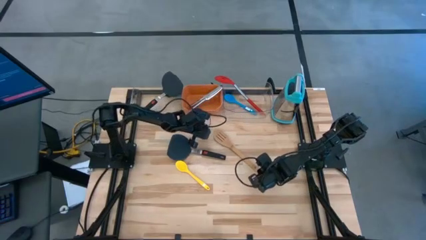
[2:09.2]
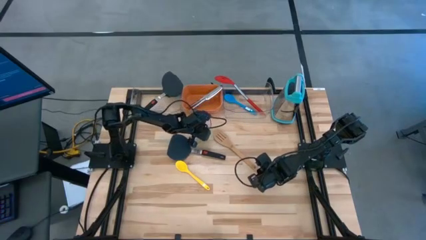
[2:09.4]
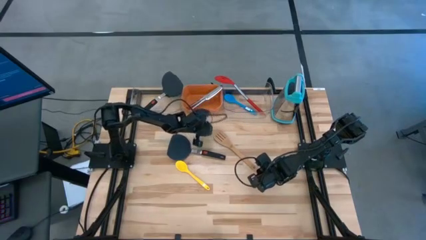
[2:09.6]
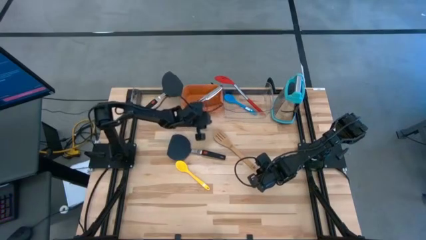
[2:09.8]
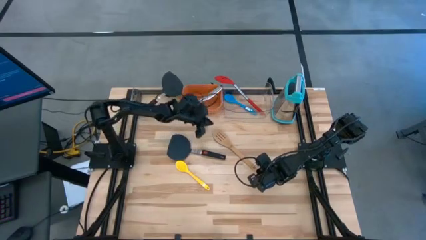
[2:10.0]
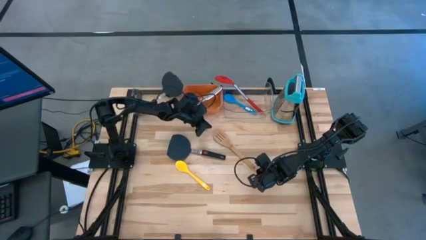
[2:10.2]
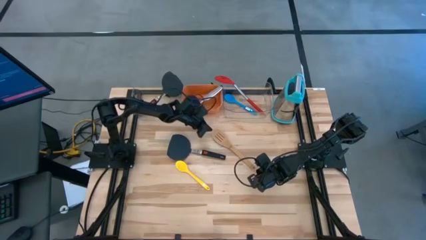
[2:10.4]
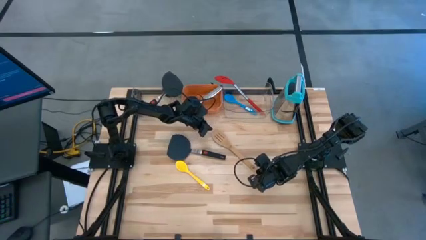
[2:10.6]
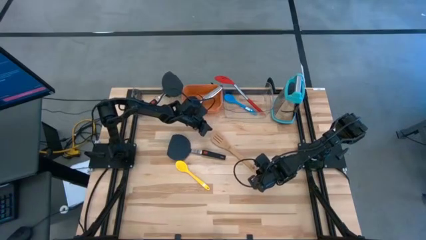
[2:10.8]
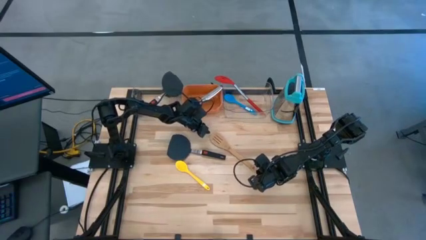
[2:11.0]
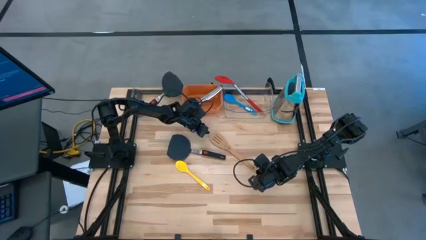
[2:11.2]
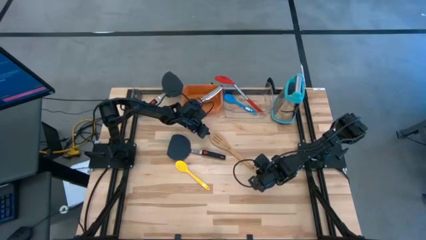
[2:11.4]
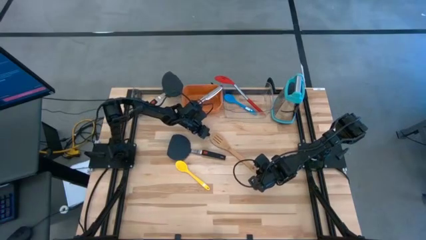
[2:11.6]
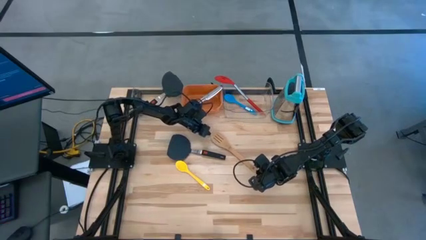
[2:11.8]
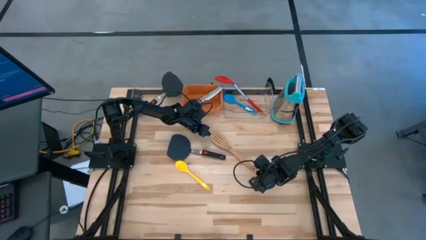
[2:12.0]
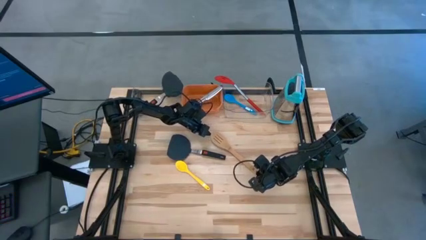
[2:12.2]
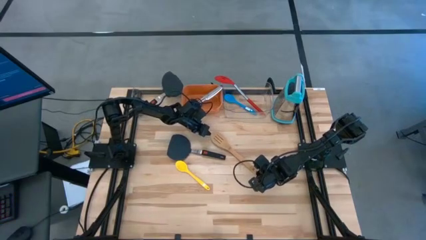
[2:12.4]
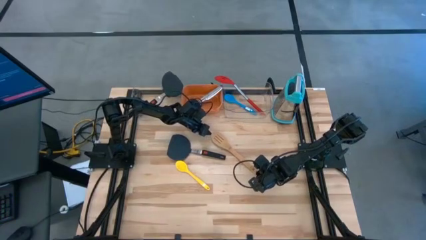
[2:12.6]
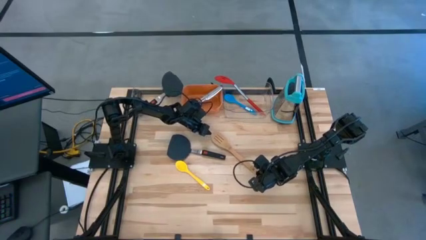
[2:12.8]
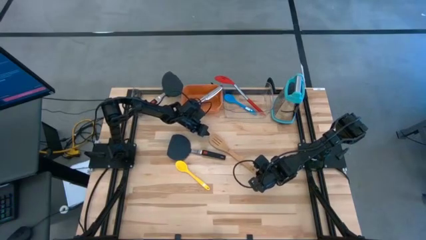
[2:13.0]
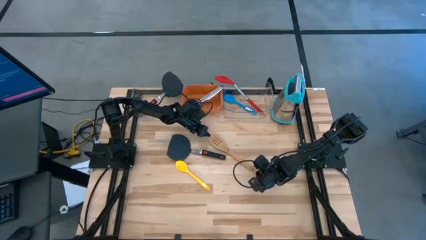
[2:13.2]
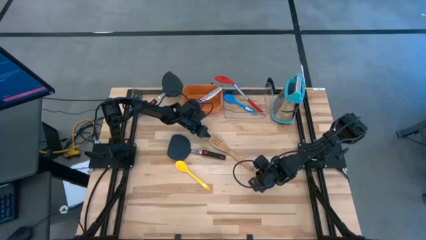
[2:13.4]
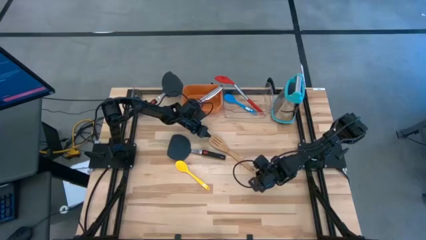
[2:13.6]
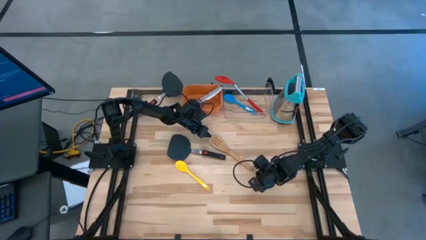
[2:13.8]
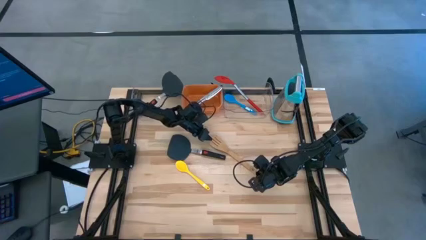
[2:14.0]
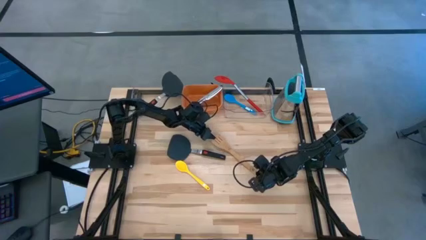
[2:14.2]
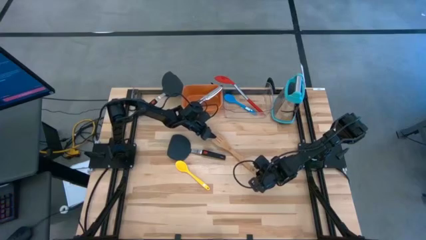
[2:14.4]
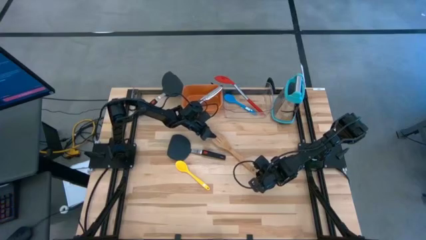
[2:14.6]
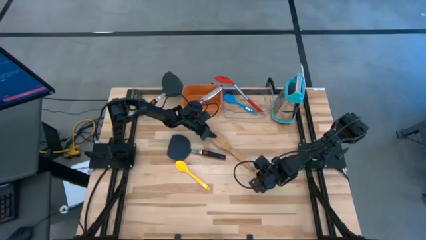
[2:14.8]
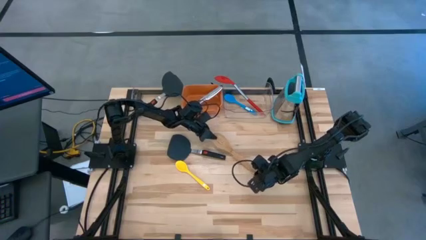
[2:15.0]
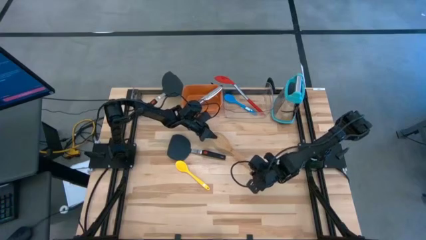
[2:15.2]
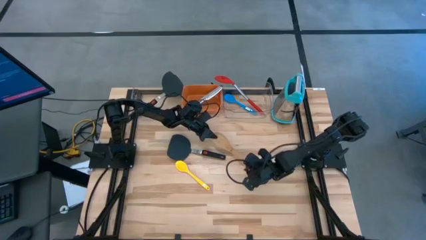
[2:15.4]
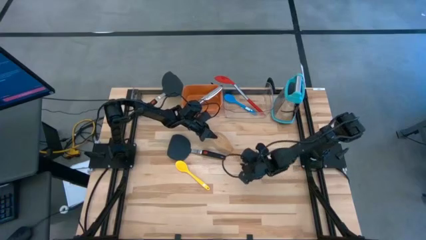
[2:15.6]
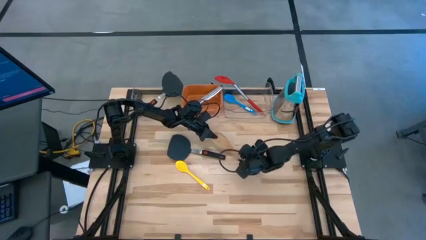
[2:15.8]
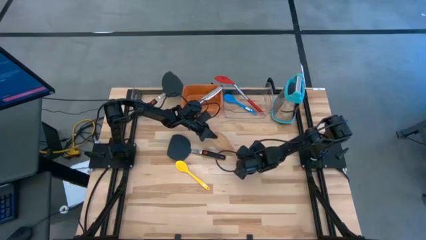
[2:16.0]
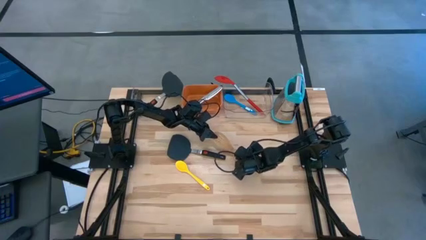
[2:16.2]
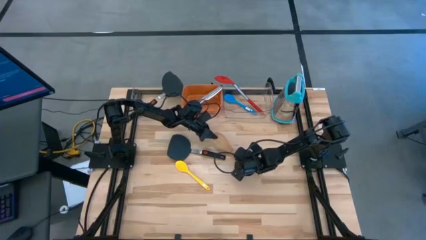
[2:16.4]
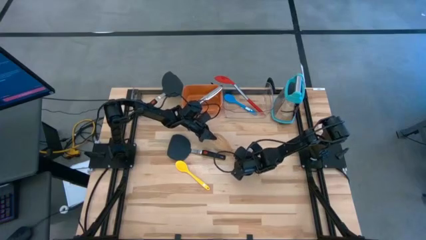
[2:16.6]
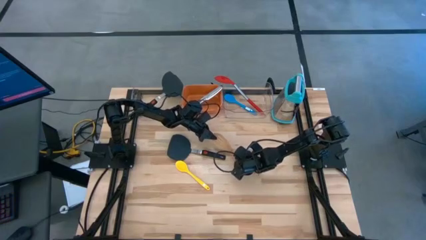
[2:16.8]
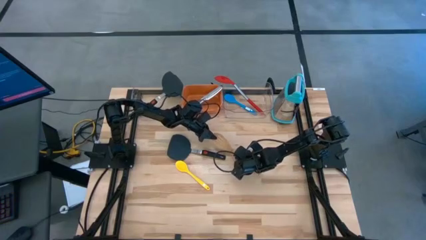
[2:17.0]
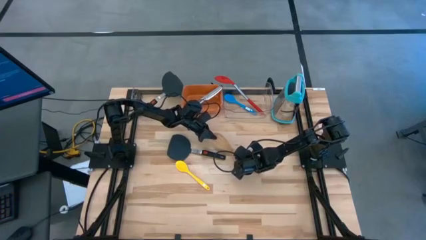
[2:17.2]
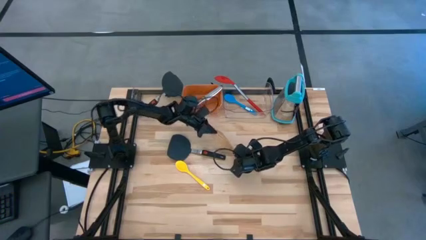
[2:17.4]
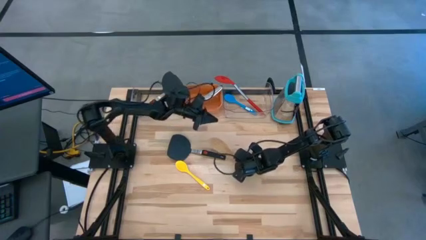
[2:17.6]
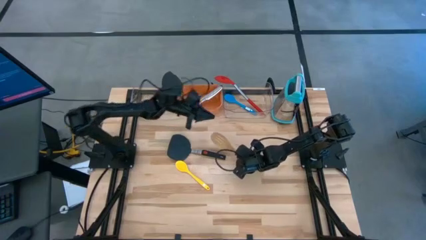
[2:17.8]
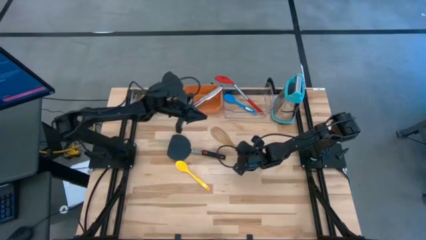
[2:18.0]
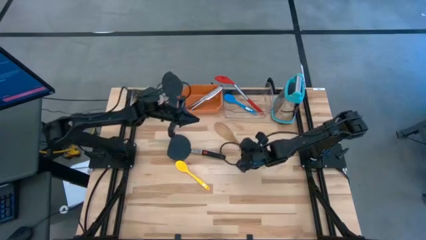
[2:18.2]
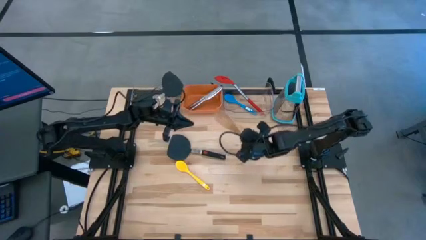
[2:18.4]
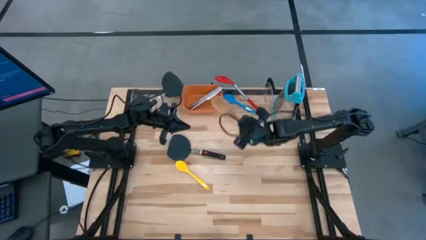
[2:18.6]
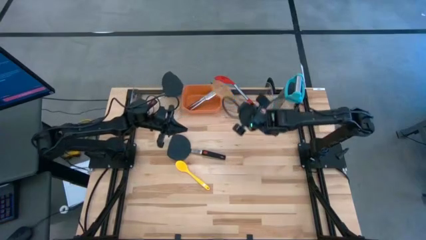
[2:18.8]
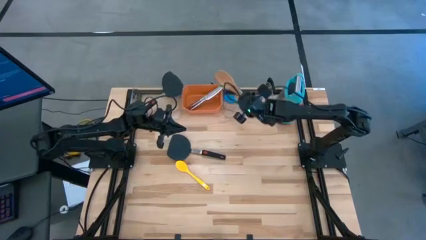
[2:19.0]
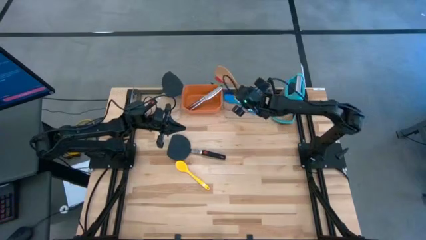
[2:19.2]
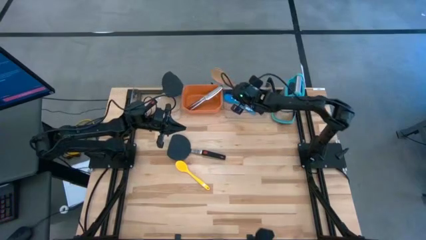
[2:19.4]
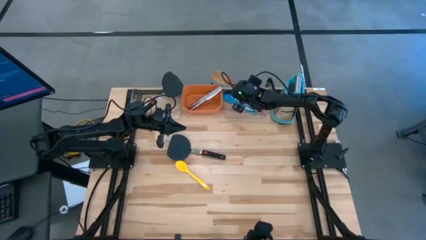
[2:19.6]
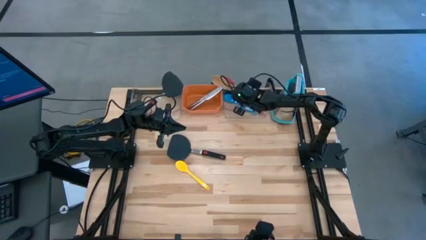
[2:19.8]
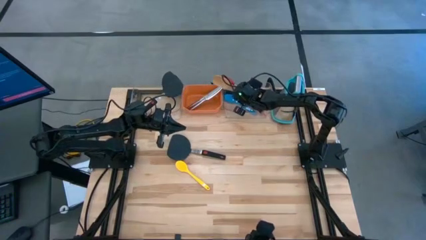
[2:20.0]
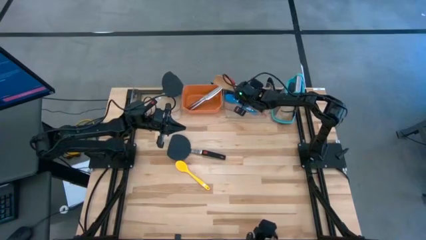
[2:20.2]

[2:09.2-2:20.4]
Task: Pick & Place Kitchen Items
Put the wooden serving spoon into the right transparent bin

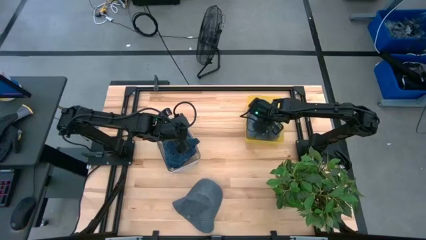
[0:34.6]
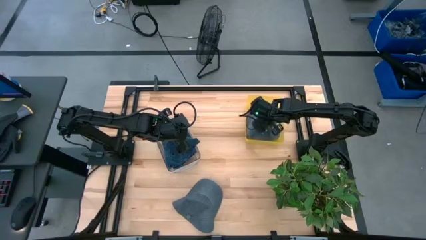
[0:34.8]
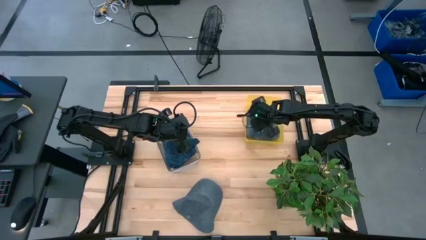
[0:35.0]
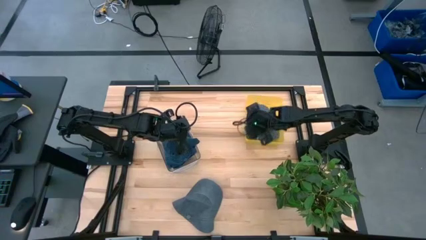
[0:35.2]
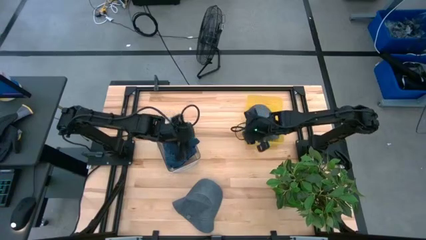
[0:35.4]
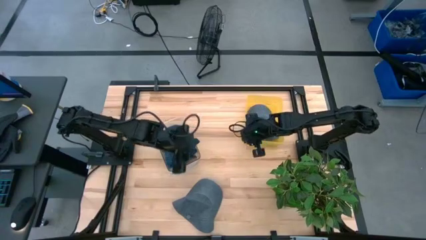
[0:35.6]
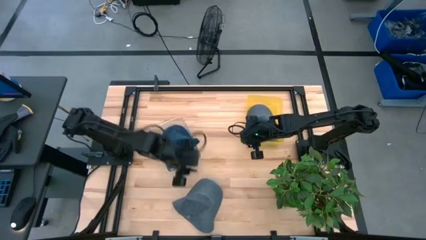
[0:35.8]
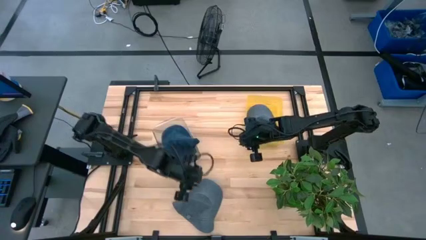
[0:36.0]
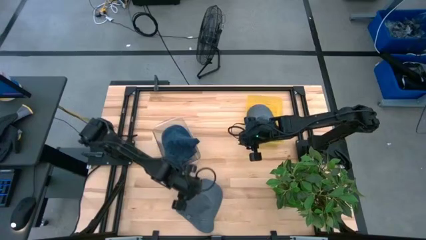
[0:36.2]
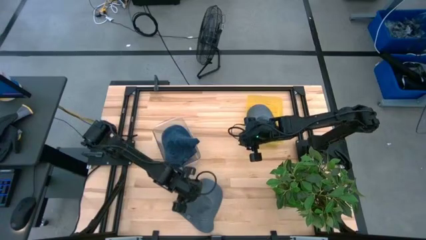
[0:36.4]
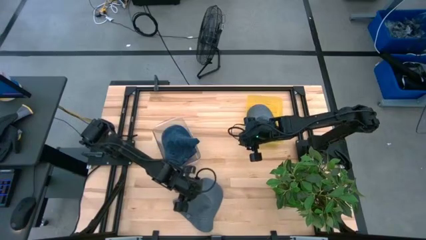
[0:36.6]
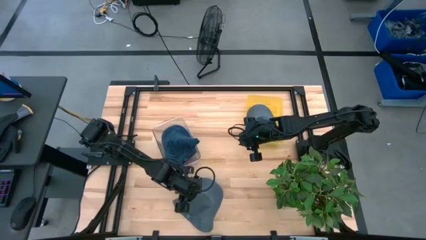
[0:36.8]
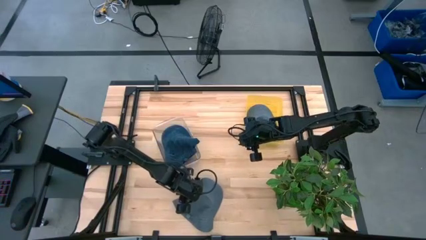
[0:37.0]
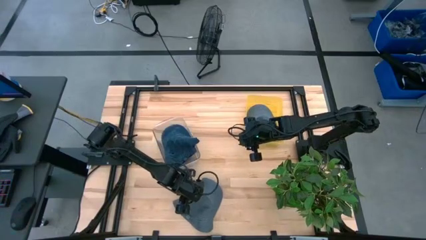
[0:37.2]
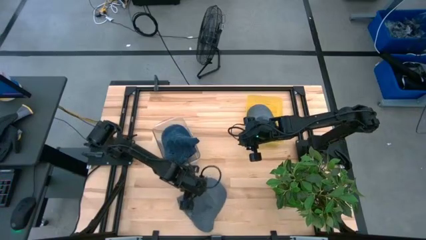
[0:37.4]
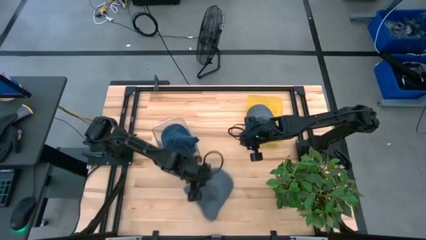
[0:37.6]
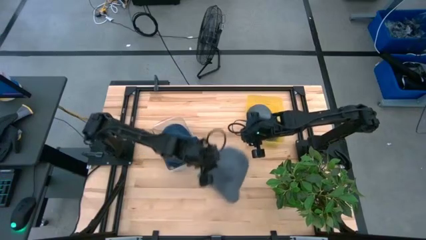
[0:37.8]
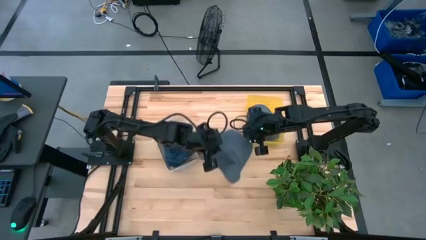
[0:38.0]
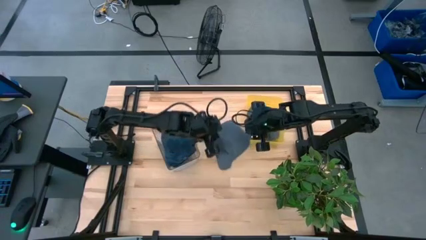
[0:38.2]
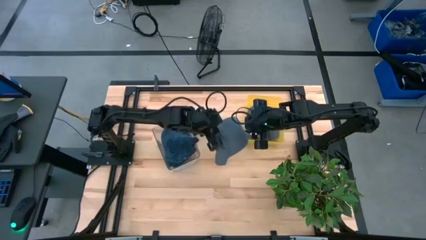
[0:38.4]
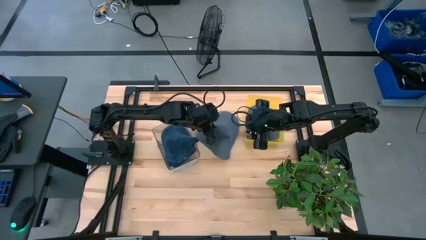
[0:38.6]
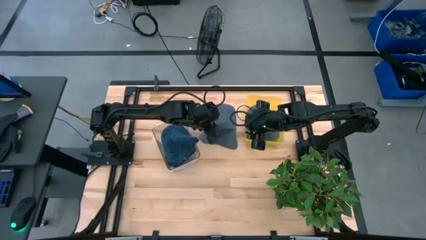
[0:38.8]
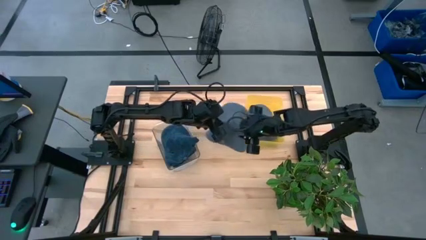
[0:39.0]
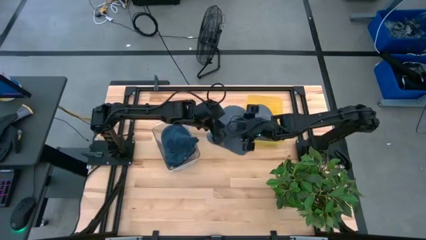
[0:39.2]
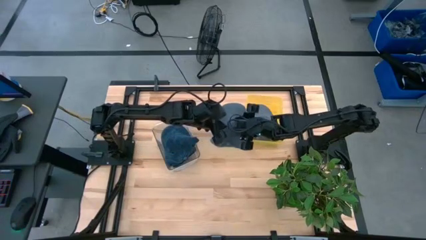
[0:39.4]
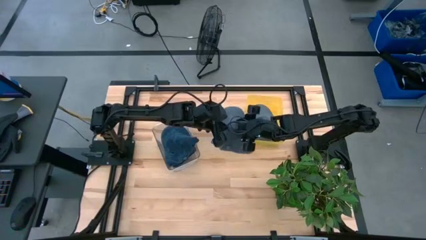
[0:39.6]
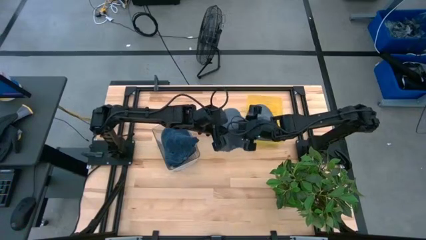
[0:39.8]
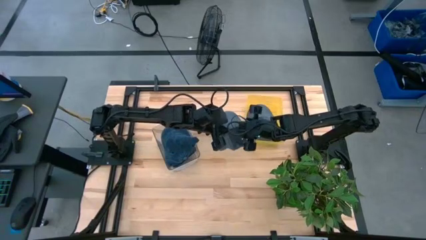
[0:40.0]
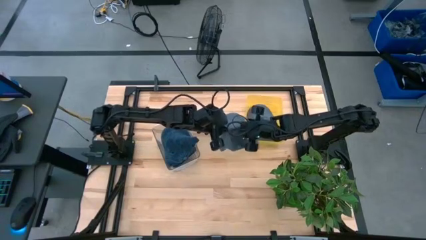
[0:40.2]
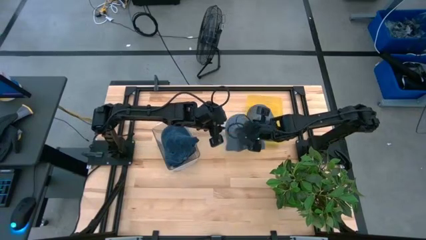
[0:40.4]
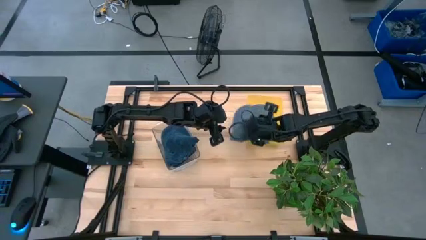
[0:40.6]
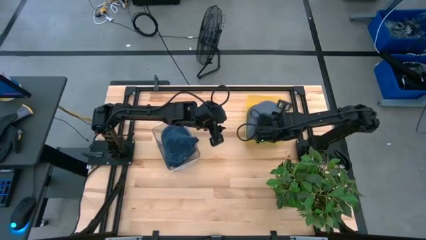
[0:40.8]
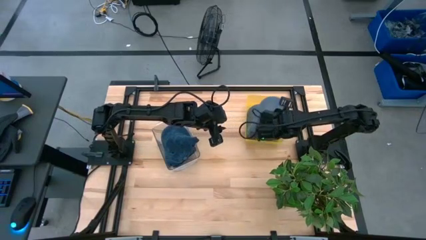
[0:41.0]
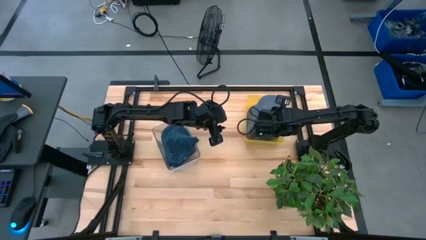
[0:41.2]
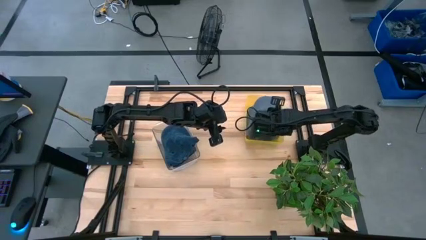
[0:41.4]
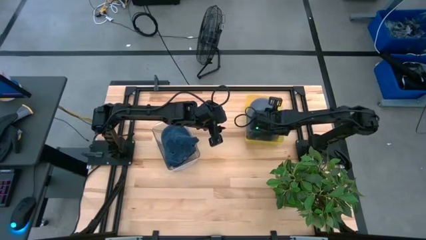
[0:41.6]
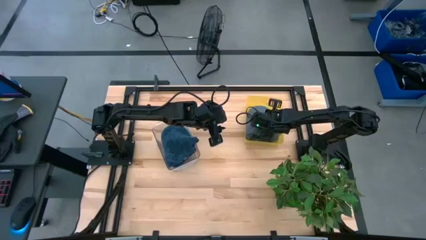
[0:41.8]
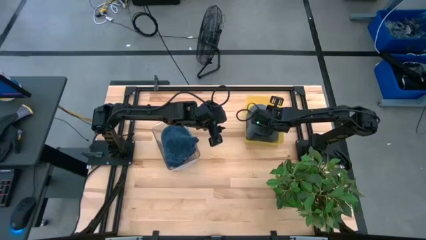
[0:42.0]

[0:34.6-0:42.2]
Task: Pick & Place hat
Put the gray cap into the yellow bin
